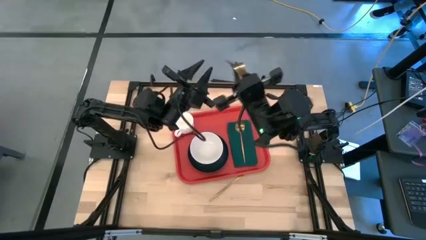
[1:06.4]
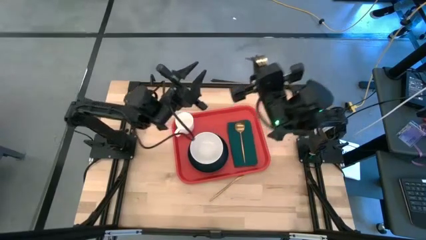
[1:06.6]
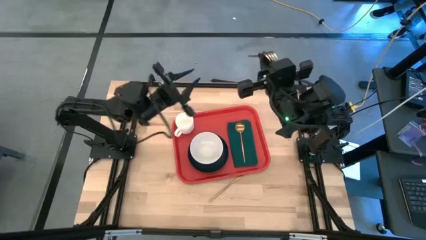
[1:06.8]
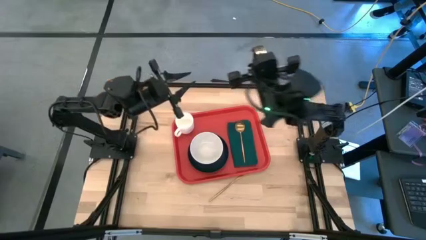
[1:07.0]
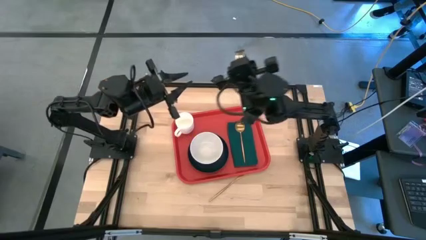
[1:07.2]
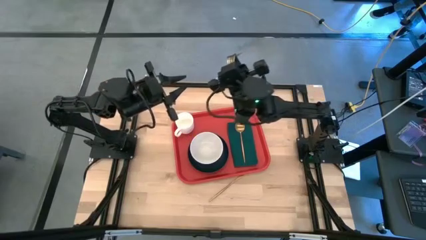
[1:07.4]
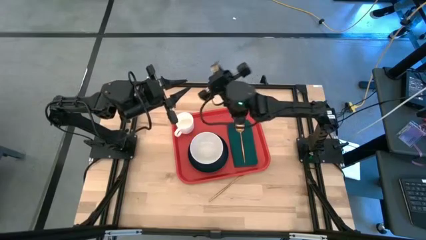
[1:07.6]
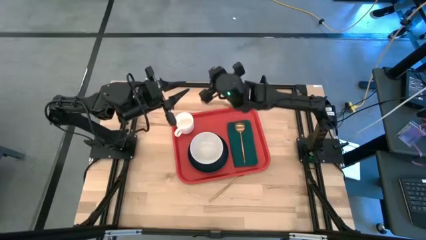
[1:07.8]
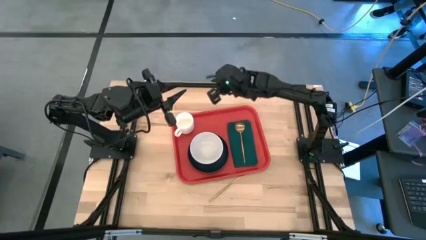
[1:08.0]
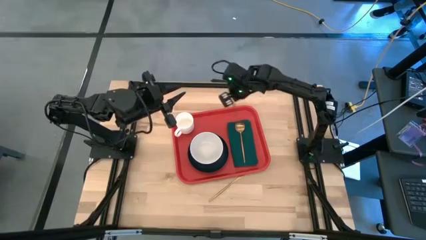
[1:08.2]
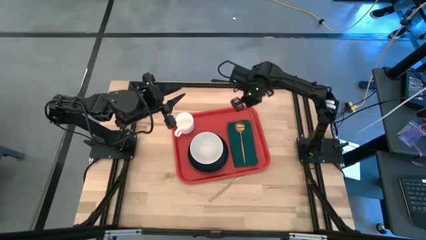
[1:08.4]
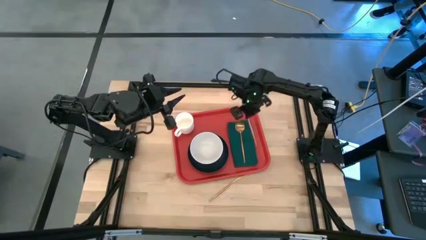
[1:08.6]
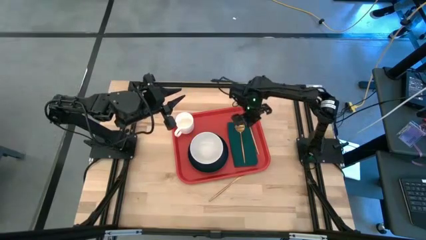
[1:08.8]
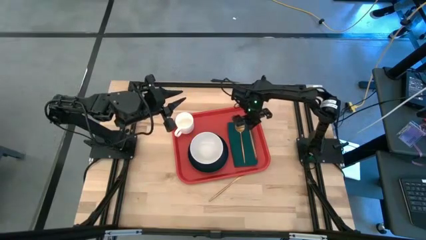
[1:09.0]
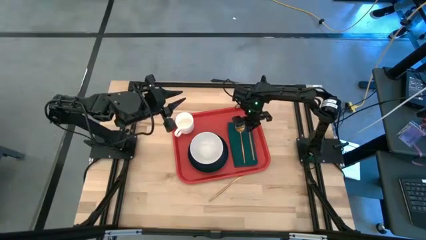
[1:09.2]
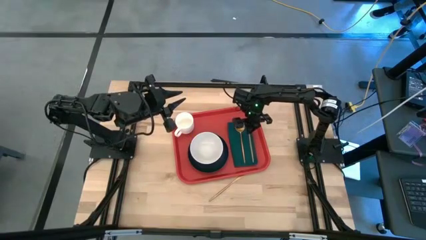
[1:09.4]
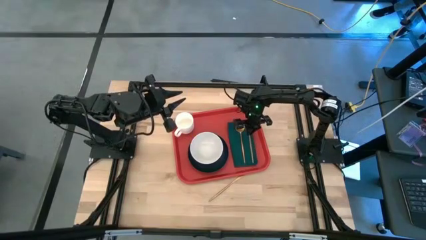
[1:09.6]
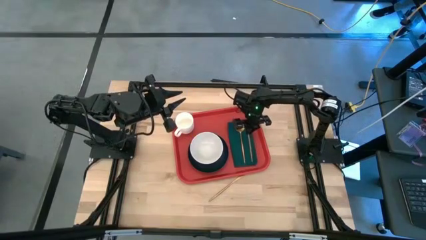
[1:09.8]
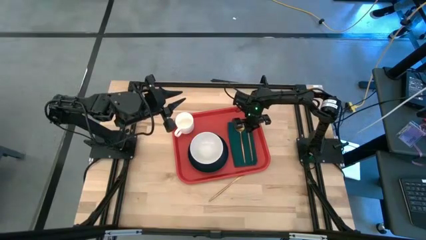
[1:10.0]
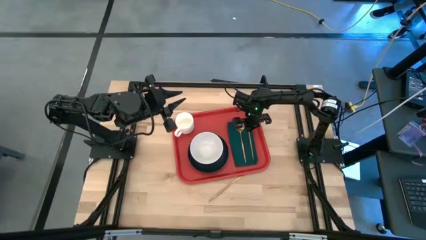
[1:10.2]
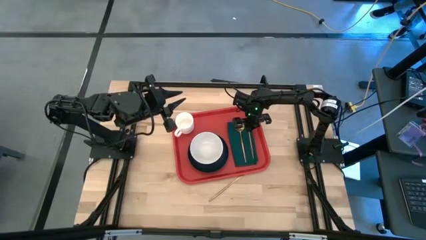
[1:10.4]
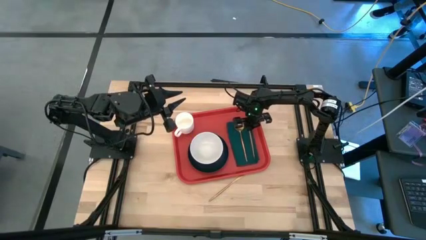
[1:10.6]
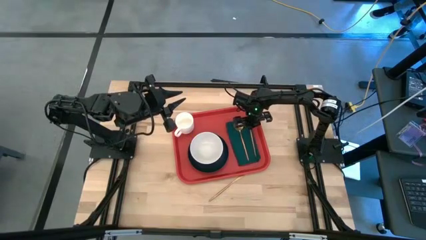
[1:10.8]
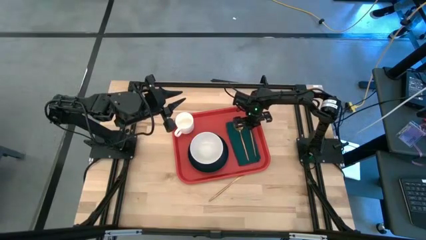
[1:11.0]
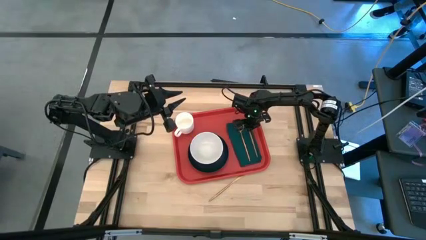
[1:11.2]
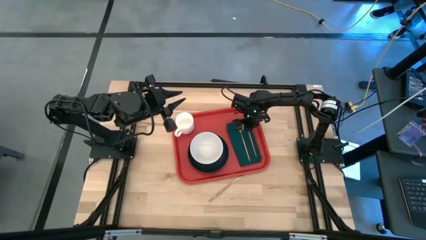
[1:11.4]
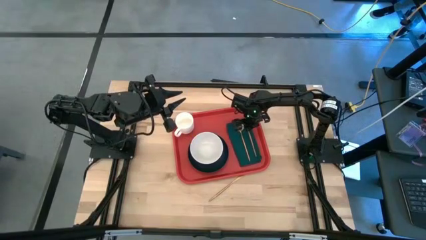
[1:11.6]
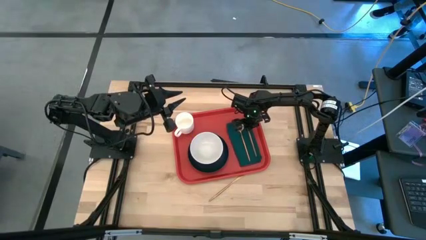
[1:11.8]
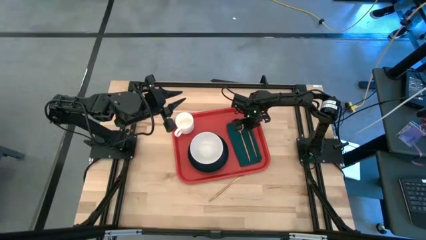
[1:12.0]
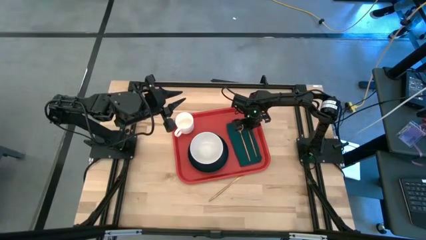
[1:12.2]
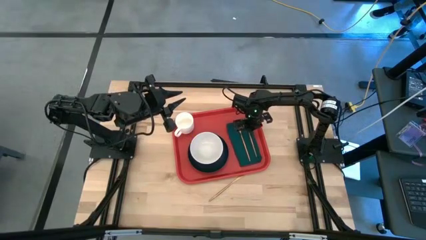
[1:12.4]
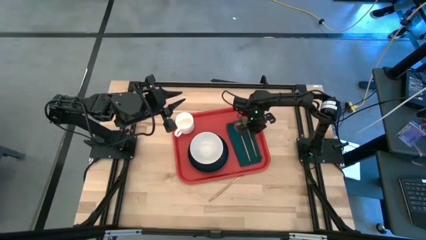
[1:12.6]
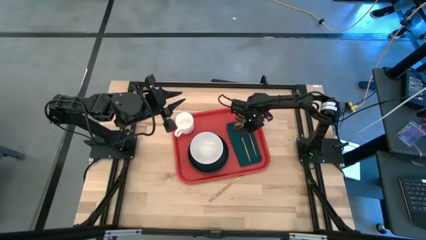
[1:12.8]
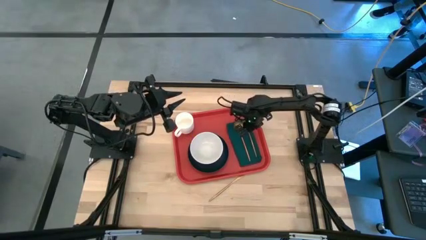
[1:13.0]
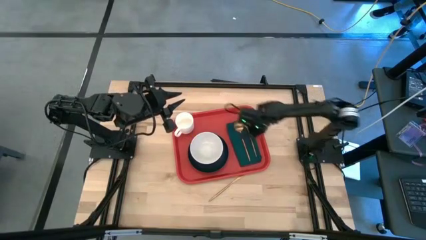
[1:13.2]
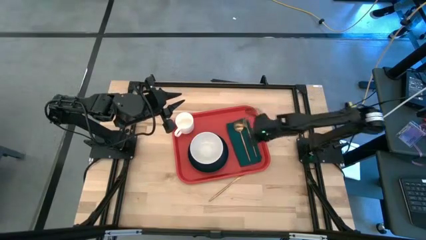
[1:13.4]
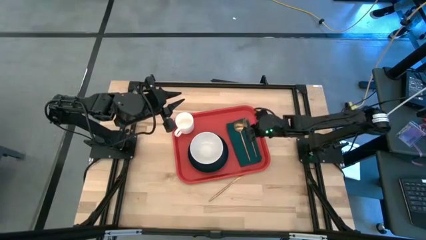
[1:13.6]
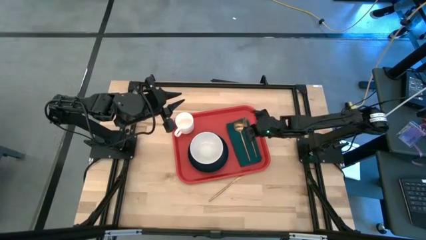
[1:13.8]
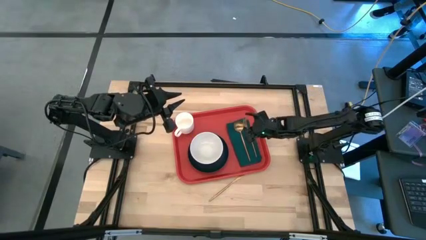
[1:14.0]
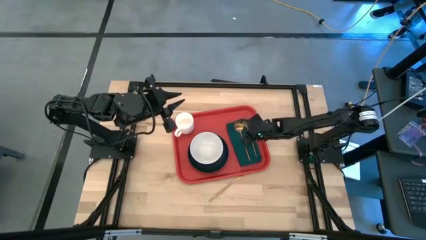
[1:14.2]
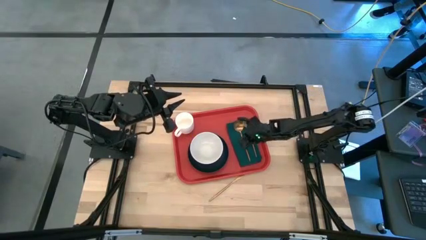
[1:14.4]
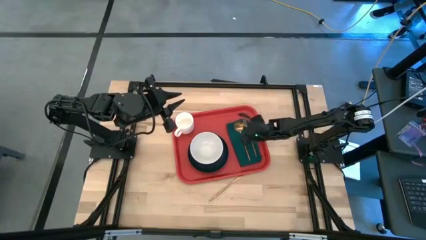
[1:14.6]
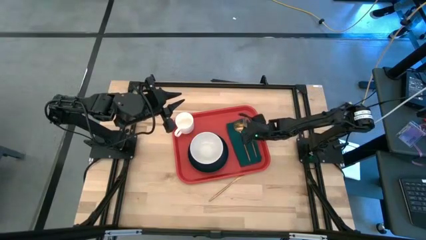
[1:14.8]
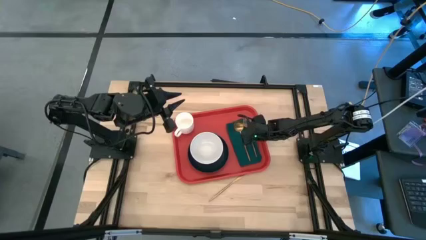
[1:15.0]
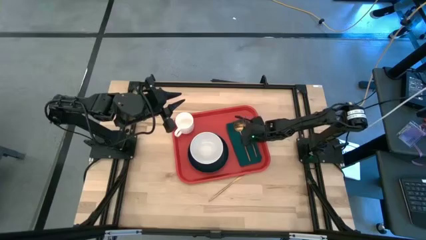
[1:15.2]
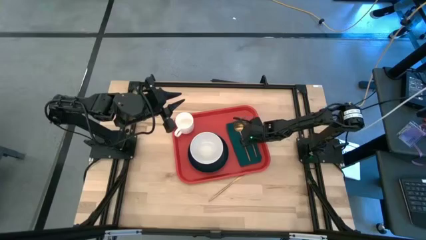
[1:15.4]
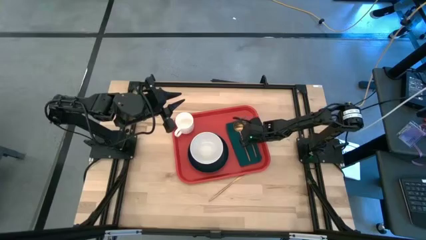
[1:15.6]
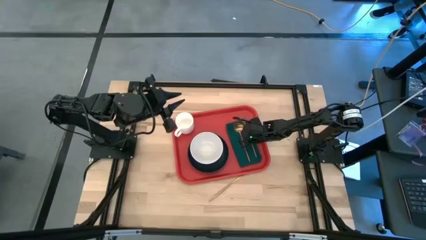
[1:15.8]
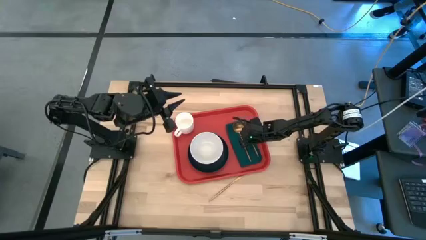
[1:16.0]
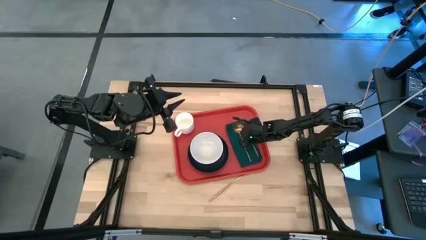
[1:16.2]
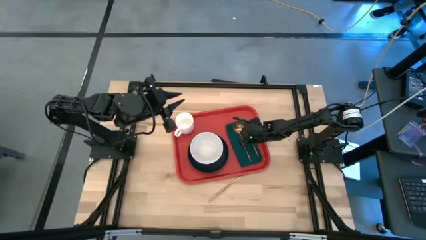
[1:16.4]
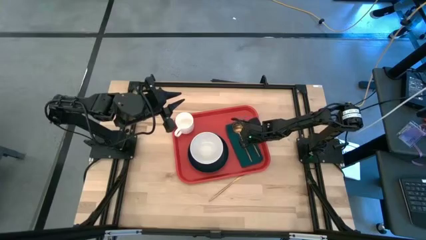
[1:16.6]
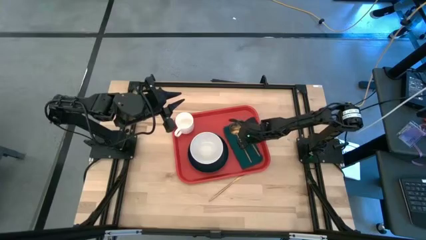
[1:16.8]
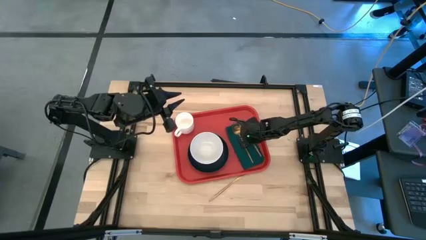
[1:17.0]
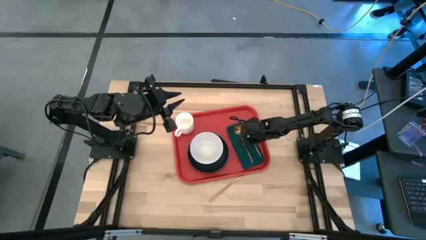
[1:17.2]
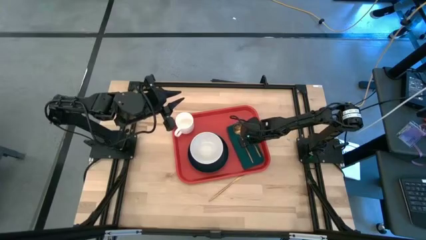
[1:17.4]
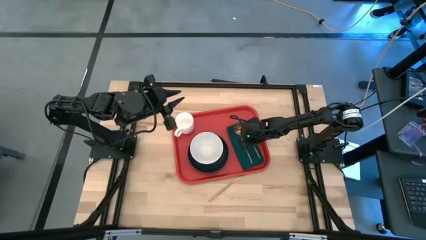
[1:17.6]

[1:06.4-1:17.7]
Task: Set up tray
Put the gold fork to the right of the gold spoon on the green napkin on the red tray

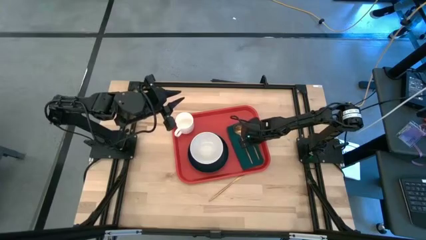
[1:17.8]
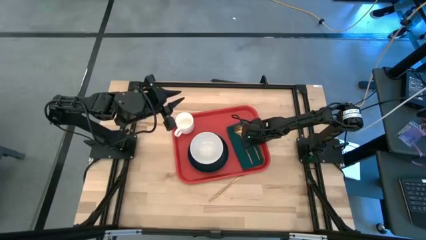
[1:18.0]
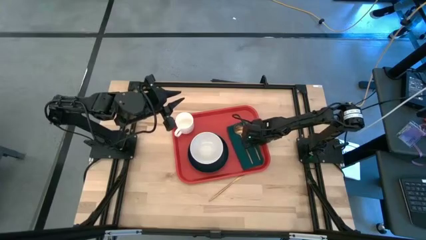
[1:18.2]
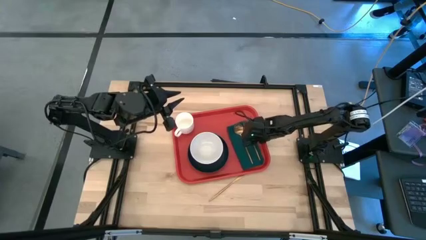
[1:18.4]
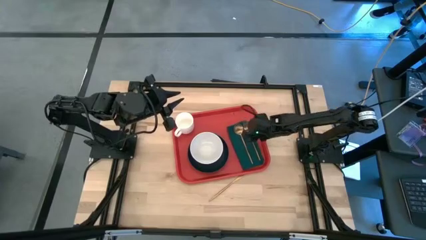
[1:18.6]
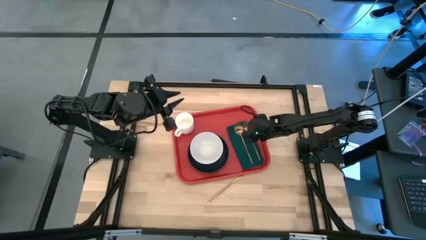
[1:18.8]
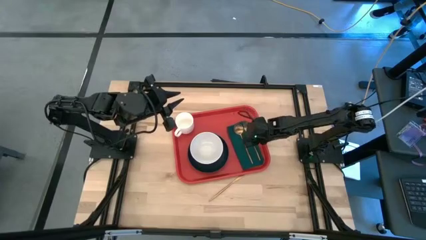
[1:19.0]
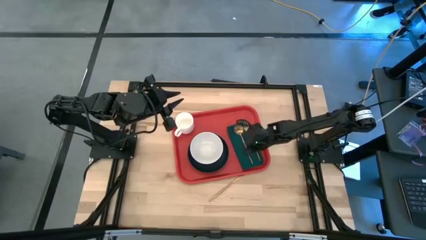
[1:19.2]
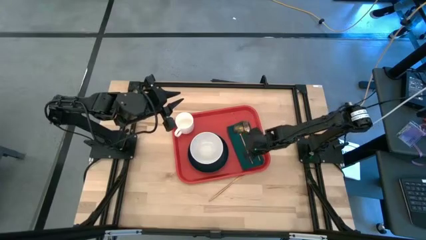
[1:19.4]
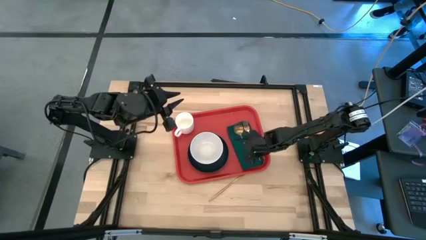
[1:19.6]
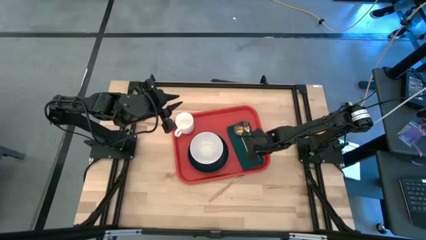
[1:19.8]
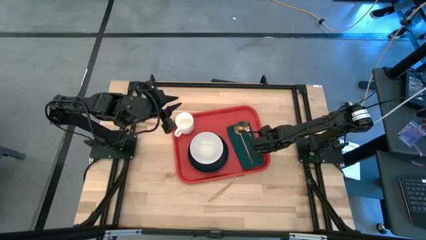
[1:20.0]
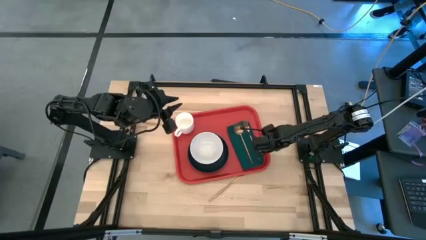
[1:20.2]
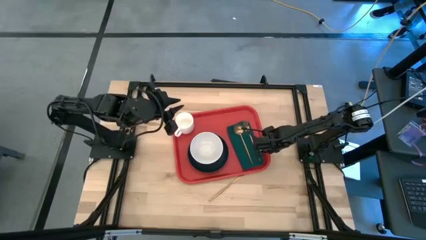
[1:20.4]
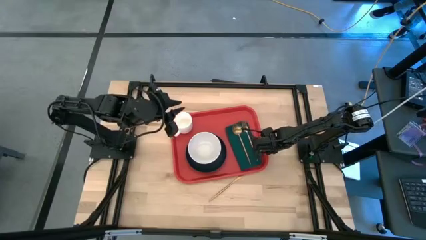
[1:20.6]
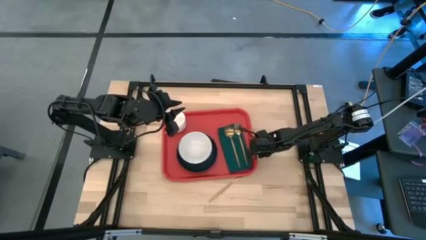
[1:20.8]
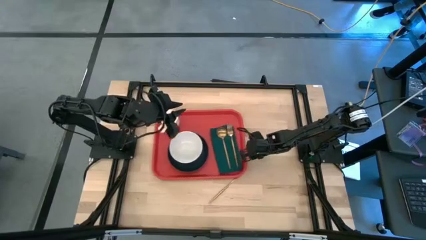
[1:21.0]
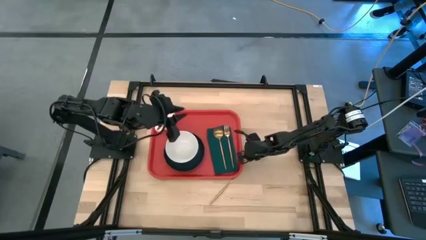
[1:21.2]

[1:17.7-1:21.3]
Adjust the red tray

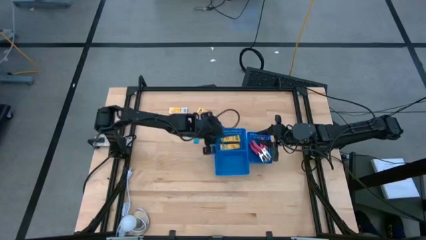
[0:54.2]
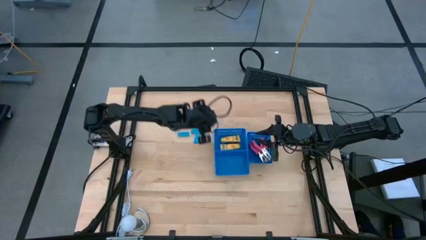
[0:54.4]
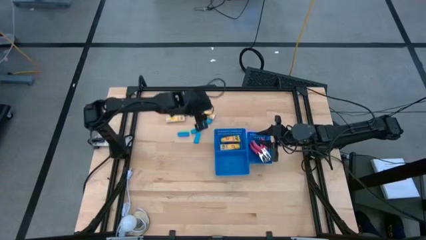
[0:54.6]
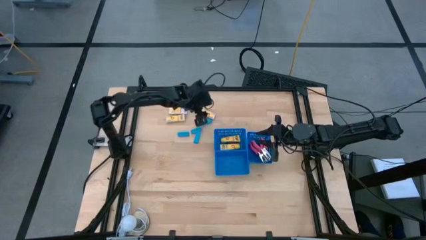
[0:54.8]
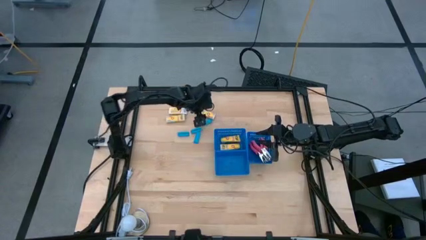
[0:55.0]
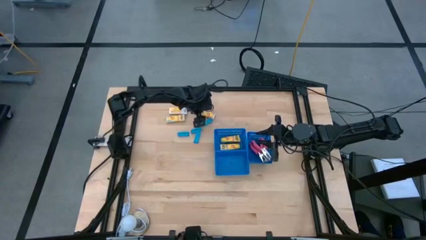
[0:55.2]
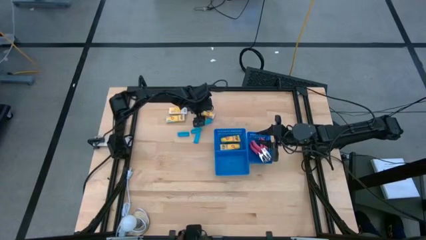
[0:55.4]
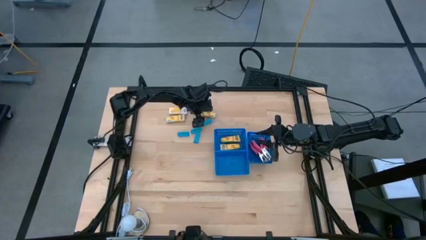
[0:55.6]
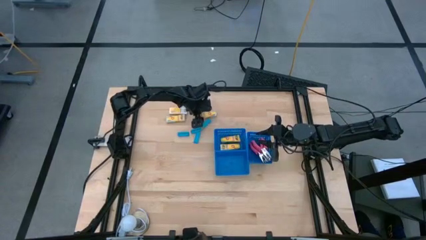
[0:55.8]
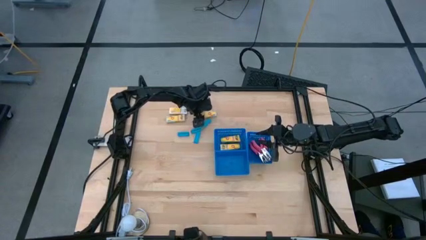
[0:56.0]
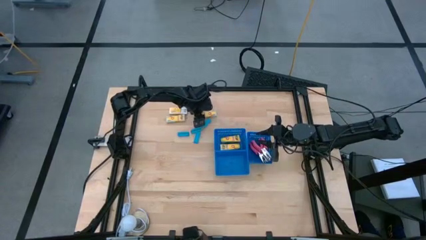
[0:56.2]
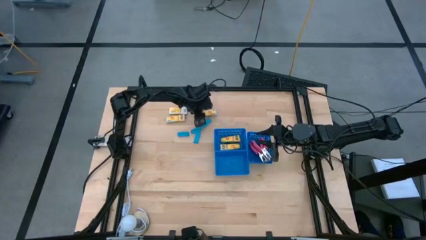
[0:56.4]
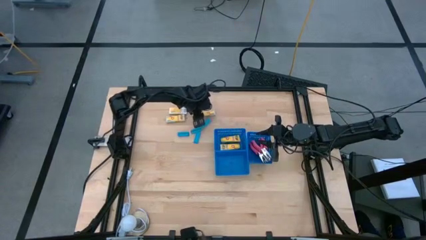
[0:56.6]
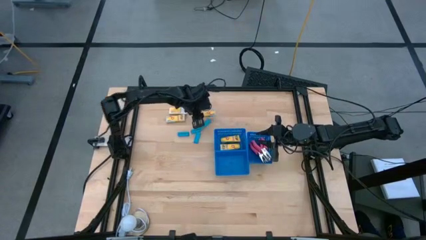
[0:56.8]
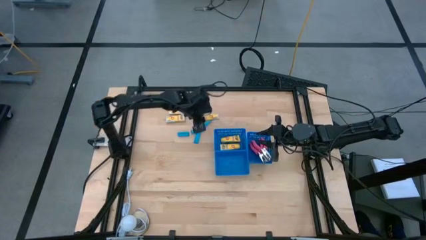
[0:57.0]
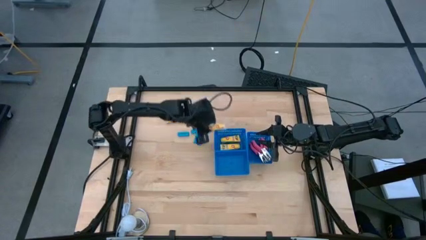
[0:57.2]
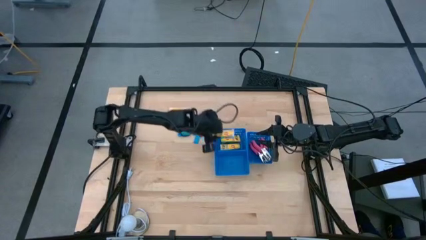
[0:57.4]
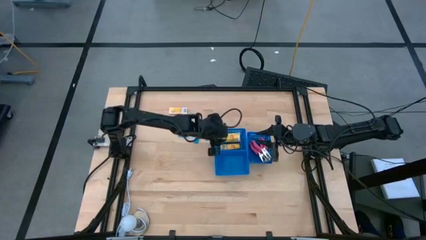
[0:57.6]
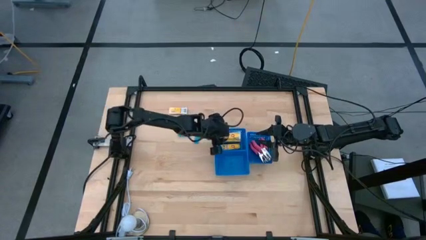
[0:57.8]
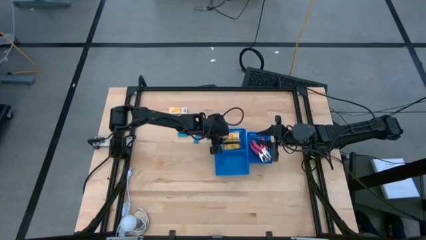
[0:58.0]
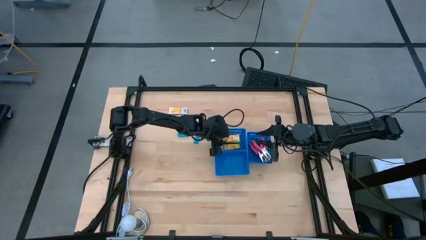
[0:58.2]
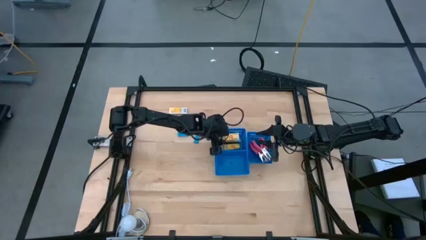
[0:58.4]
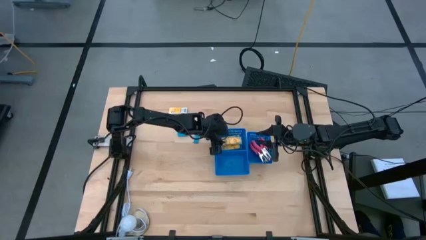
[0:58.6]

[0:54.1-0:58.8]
Task: Pick & Place School Supplies
Put the crayon box into the top horizontal blue bin
